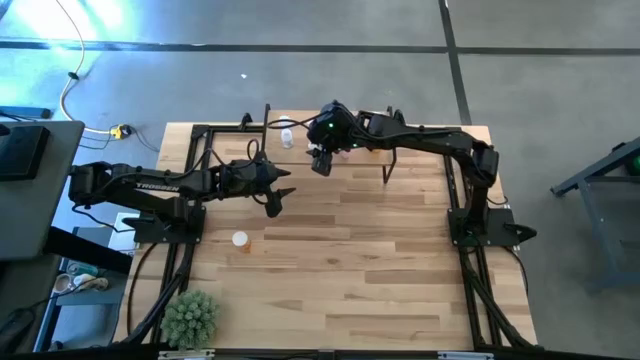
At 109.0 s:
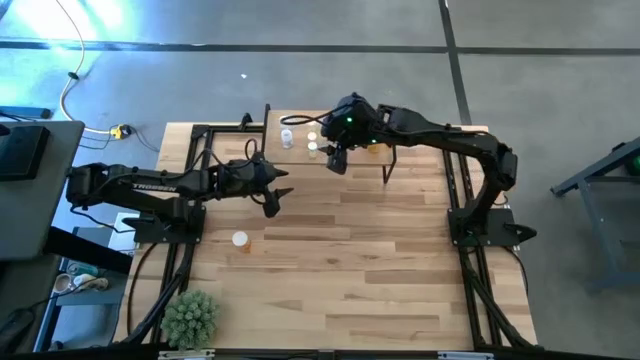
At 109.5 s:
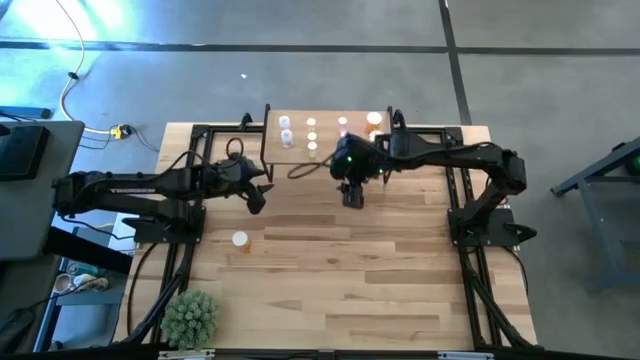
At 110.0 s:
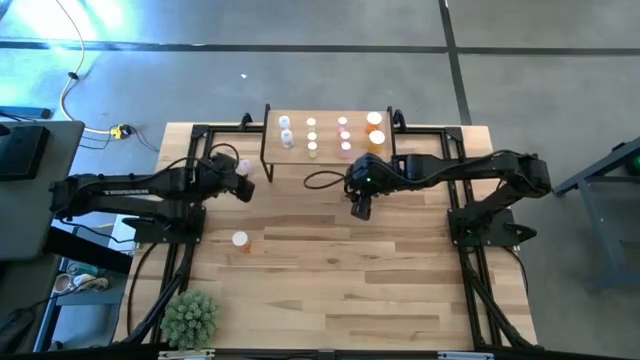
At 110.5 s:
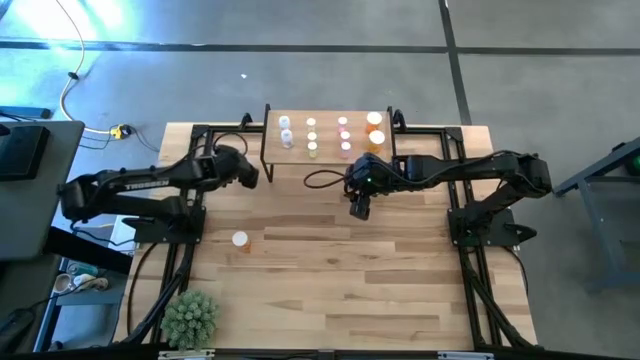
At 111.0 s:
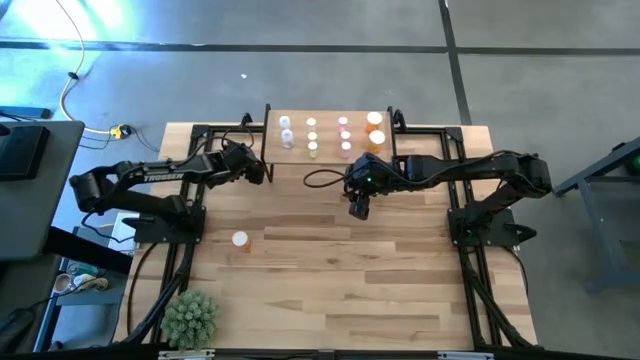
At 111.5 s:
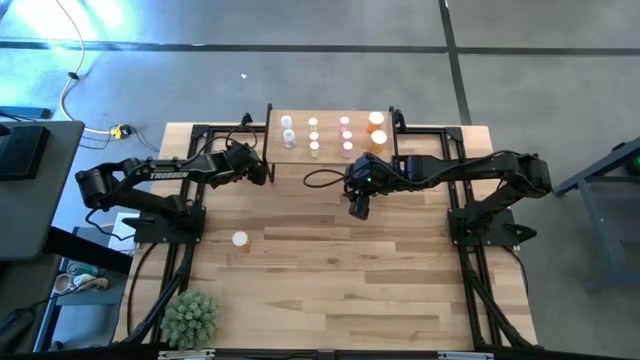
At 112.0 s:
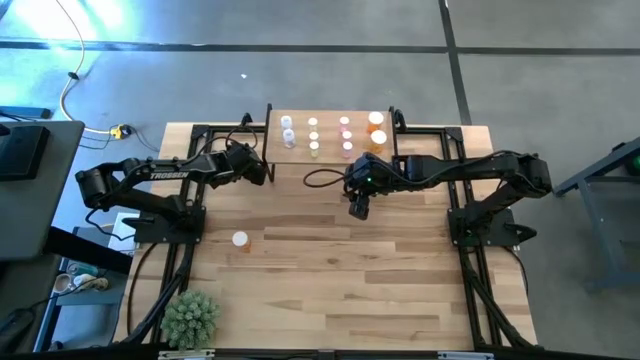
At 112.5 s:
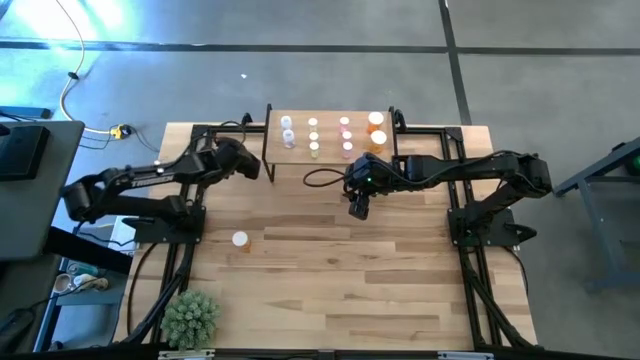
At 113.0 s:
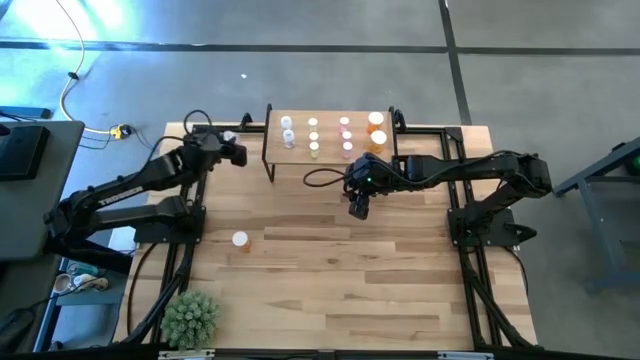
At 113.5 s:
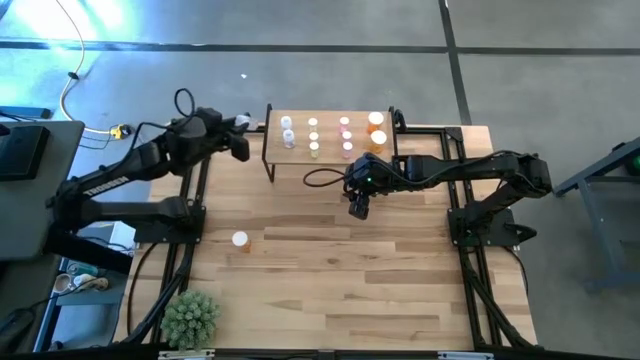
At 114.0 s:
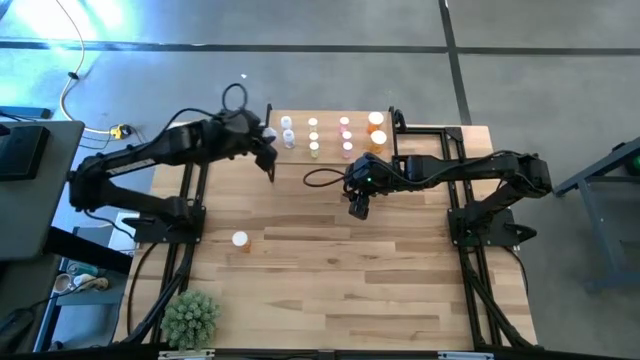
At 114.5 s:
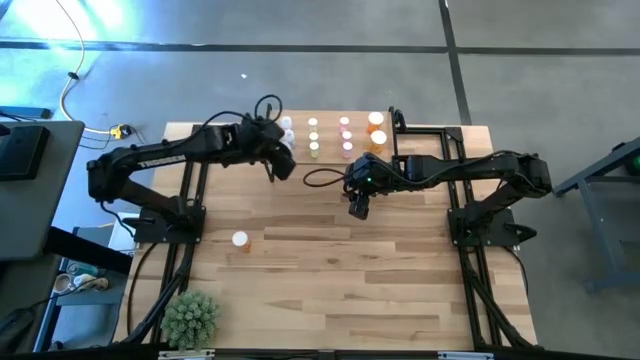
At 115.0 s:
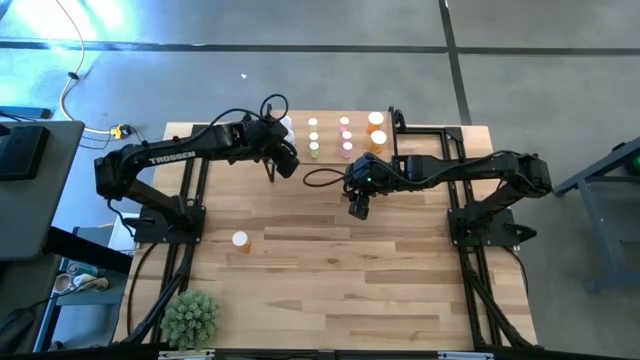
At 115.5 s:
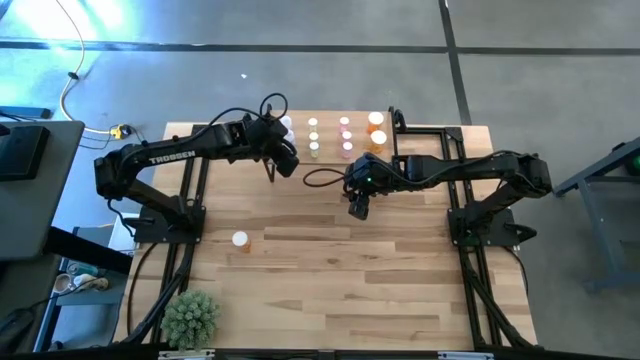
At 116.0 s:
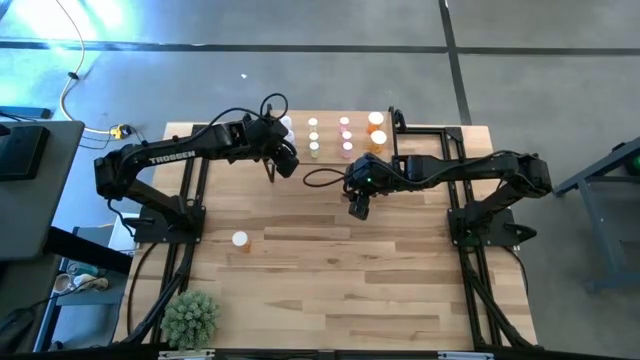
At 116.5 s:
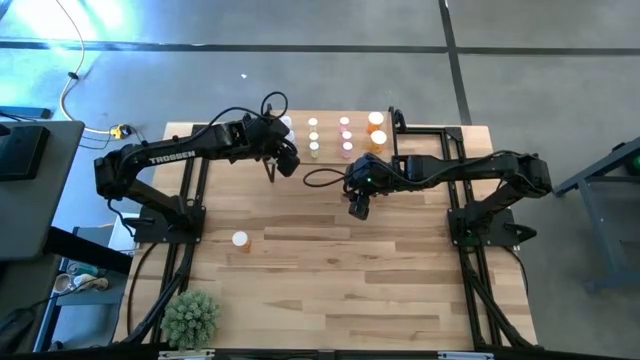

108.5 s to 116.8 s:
Task: Pick and place medicine bottles onto shelf by color
Put the transparent pill bottle on the shelf aligned with the transparent pill bottle

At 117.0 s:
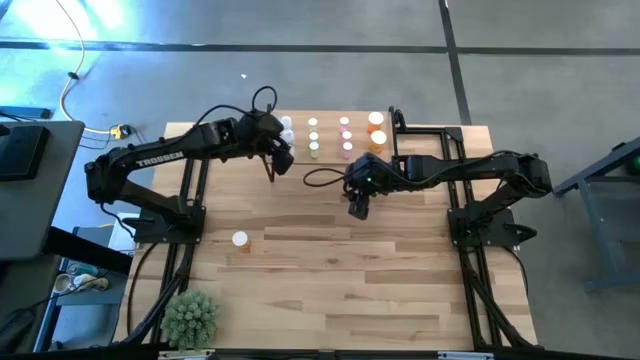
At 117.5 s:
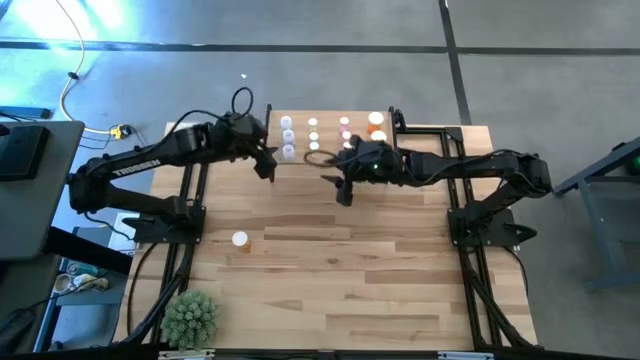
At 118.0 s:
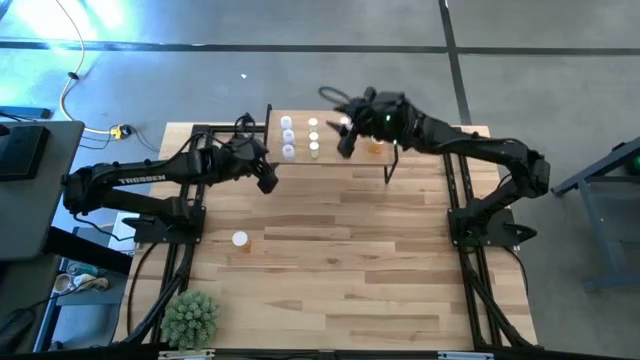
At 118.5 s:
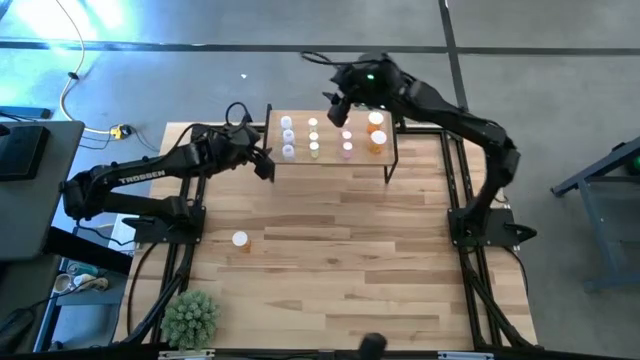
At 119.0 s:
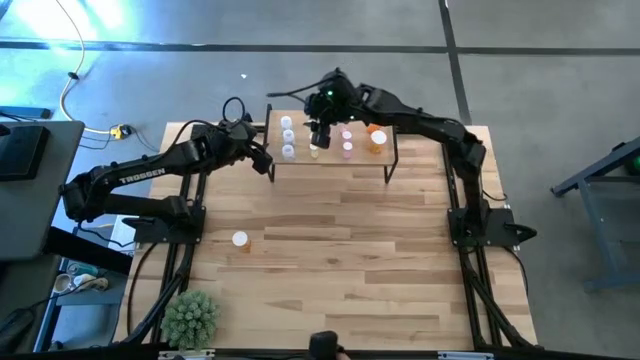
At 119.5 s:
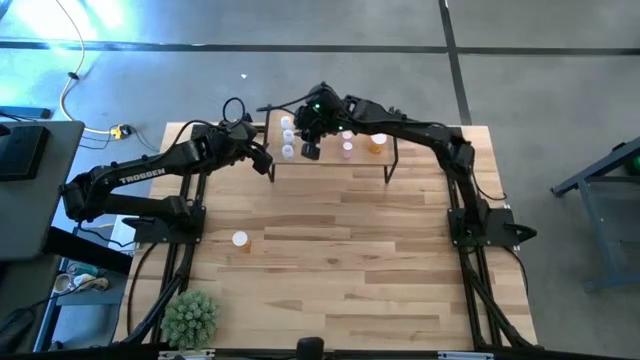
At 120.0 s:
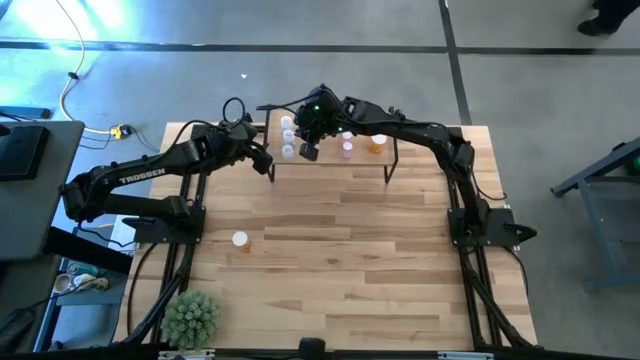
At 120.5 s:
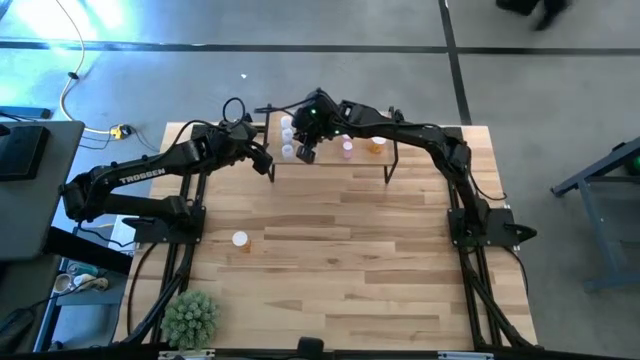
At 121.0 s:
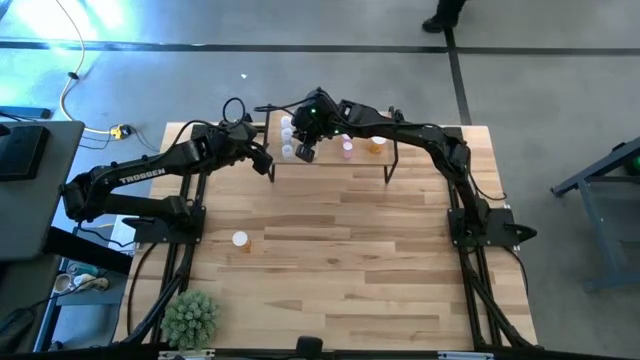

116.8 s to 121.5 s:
Adjust the transparent pill bottle on the shelf

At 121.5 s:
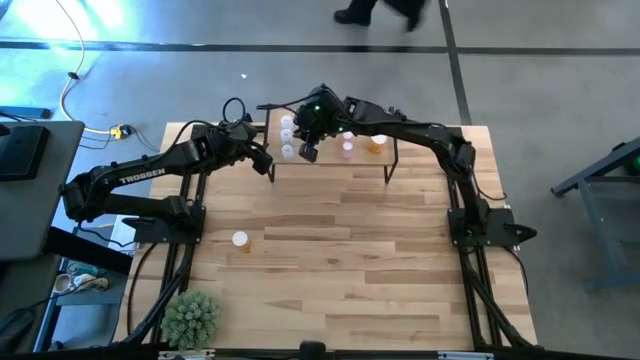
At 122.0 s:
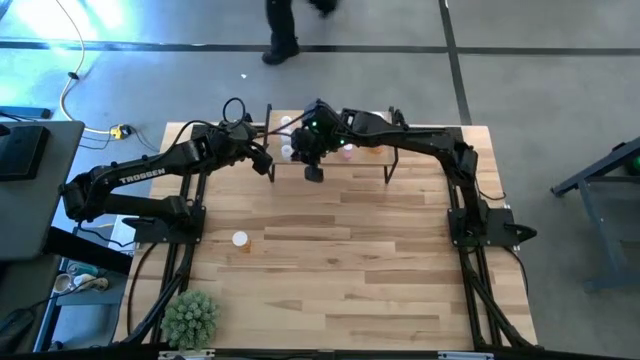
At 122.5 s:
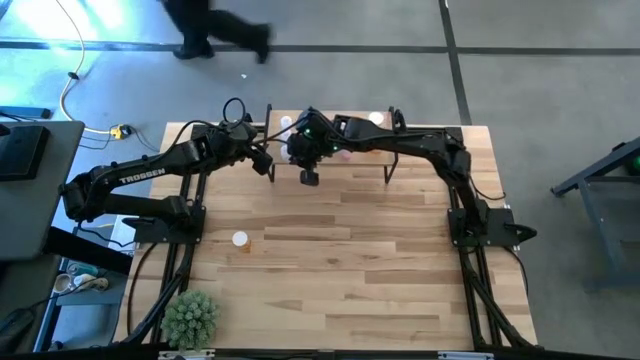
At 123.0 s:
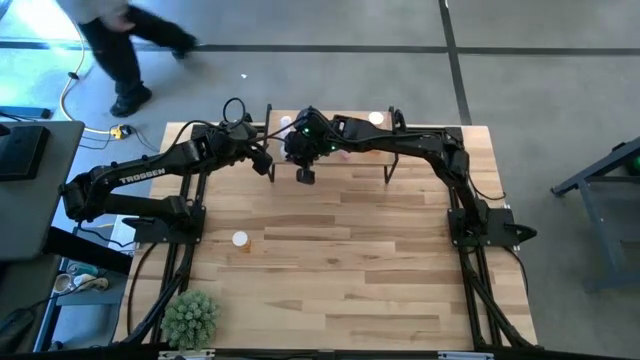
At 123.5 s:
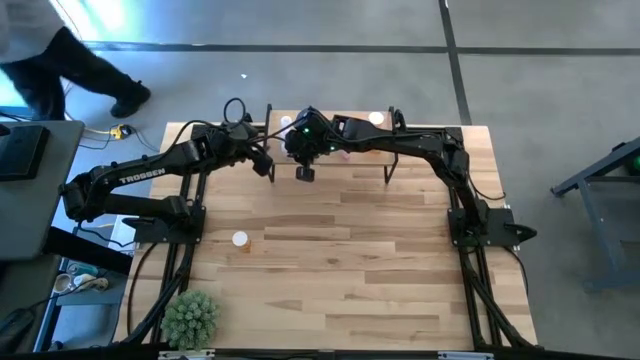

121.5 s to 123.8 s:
Adjust the transparent pill bottle on the shelf

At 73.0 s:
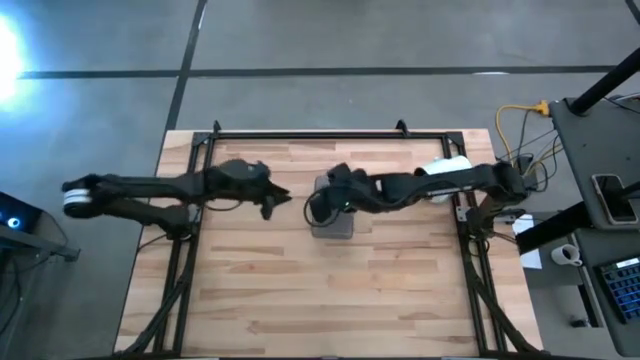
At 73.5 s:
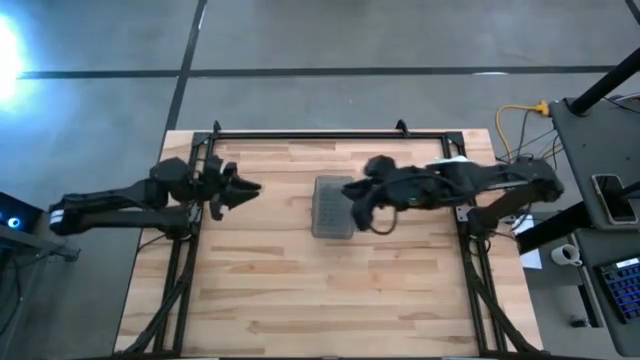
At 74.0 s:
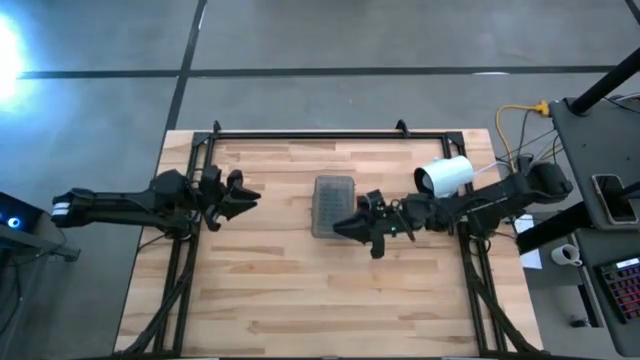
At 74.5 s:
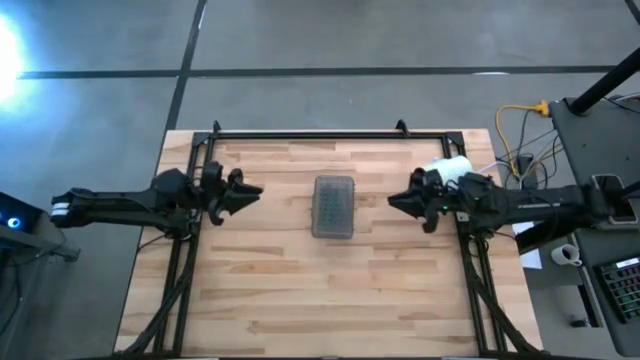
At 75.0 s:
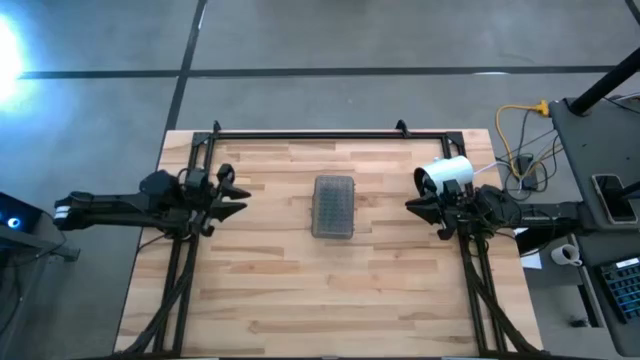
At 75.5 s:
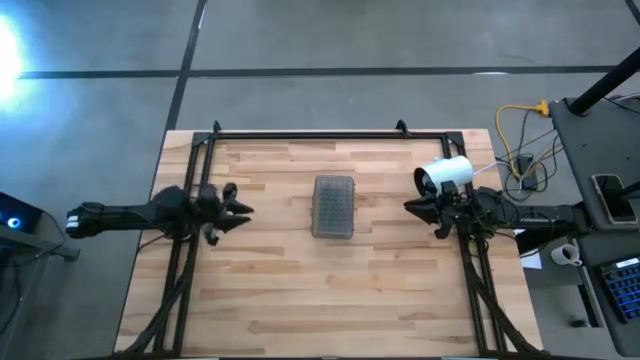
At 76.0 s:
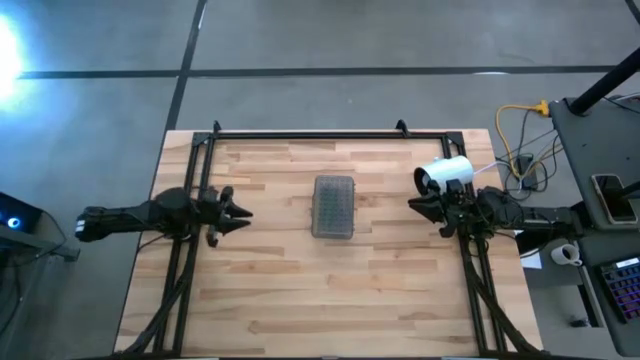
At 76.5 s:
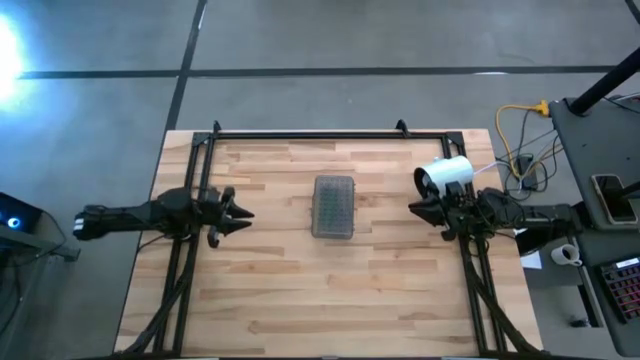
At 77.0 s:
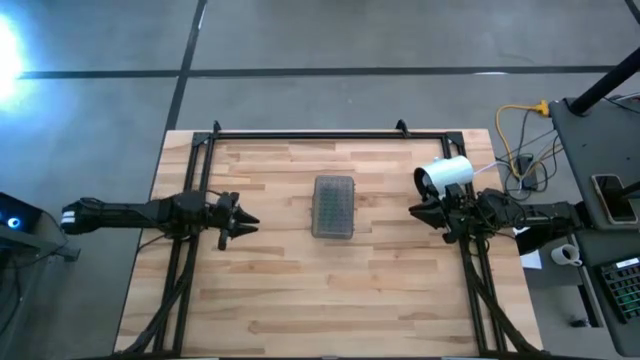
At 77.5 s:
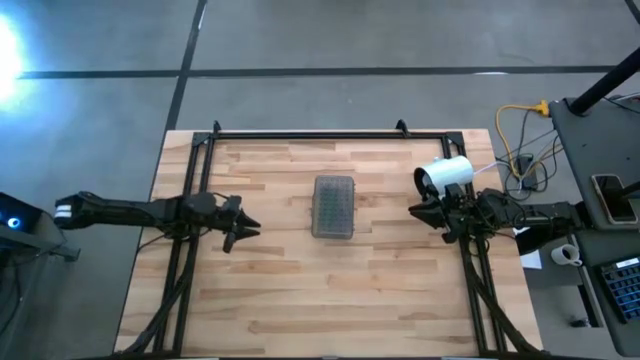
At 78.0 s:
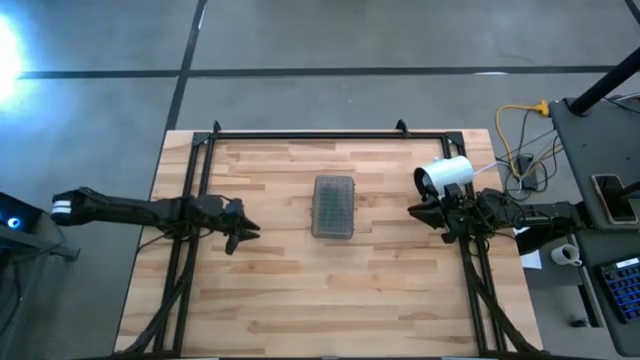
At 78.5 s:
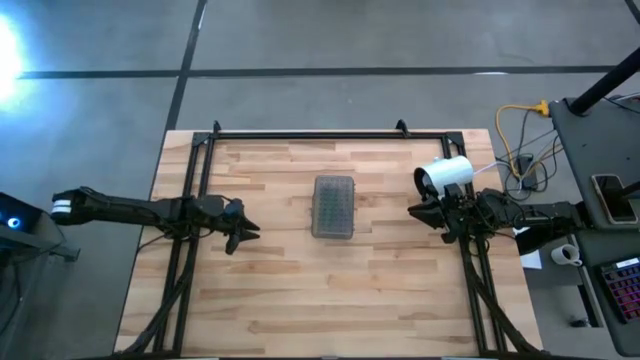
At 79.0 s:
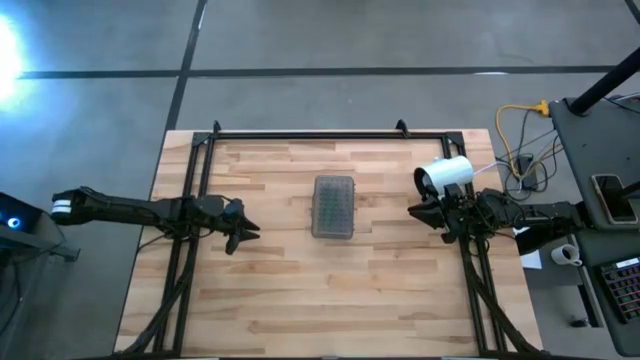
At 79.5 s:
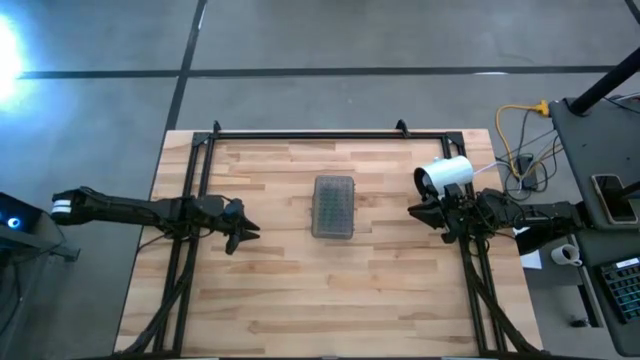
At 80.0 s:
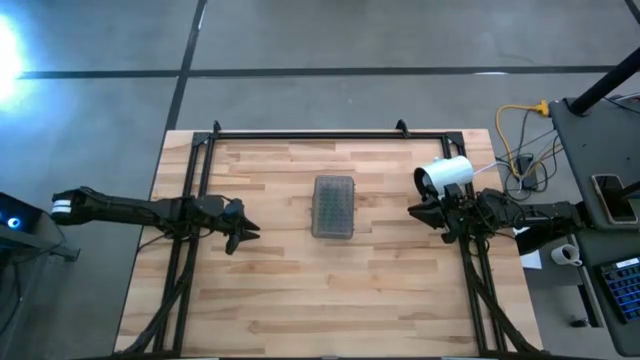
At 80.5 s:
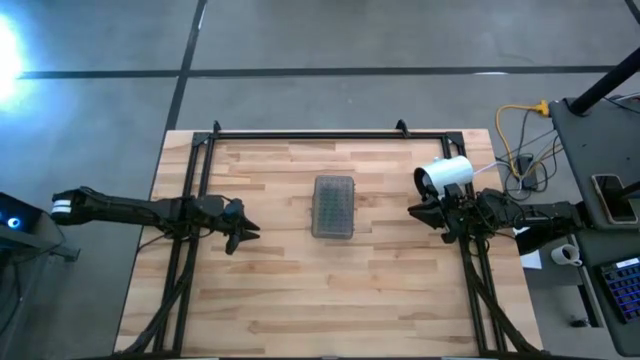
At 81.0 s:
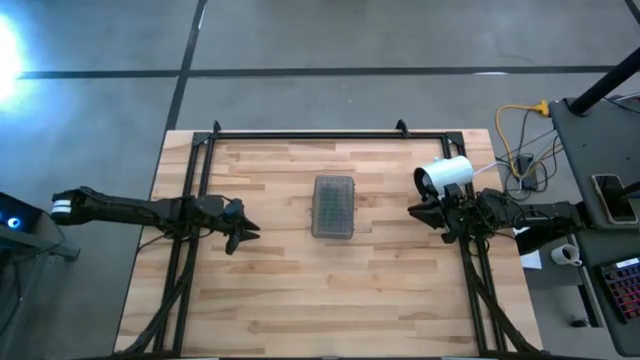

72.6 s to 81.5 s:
Task: Pick & place school supplies into a supply box
Return to Home Position
